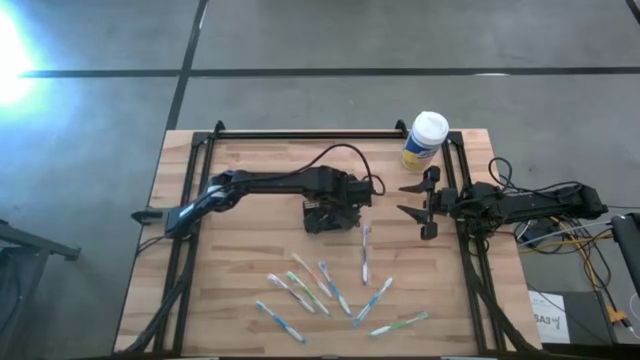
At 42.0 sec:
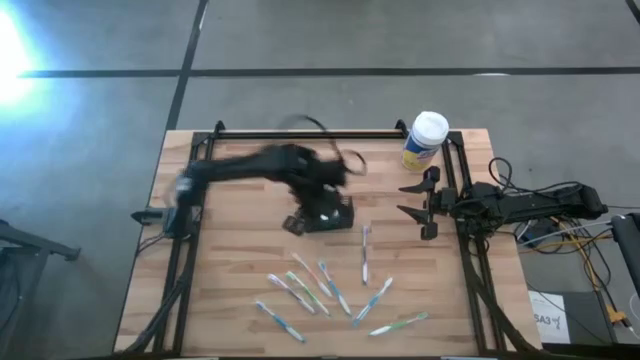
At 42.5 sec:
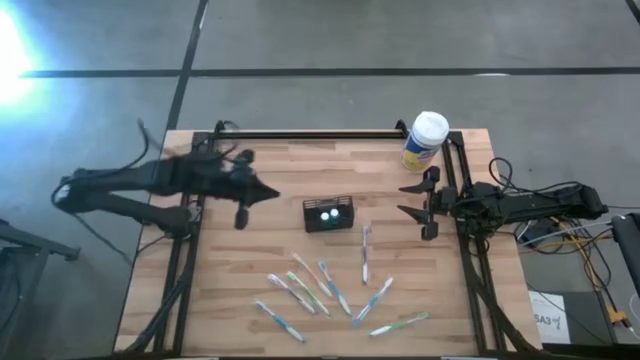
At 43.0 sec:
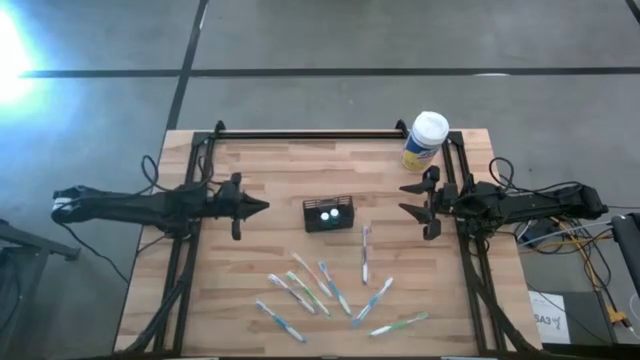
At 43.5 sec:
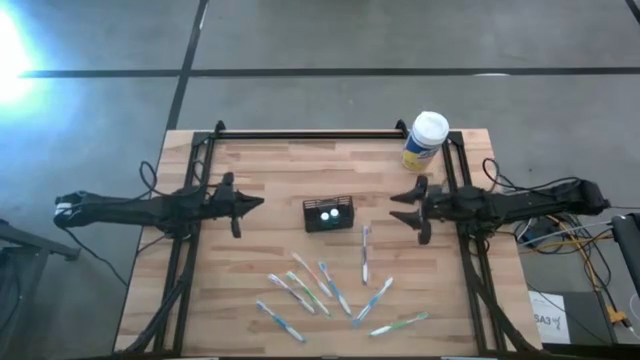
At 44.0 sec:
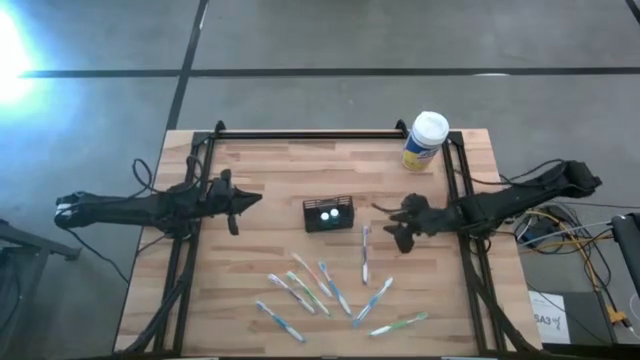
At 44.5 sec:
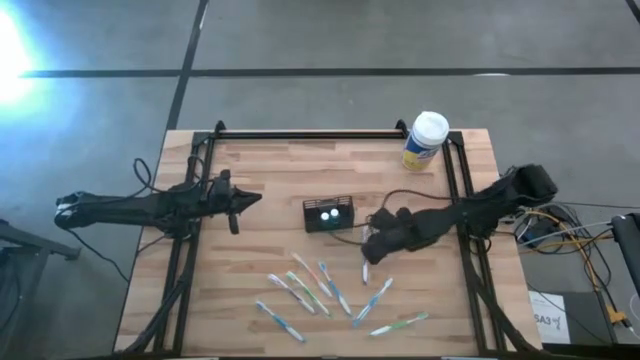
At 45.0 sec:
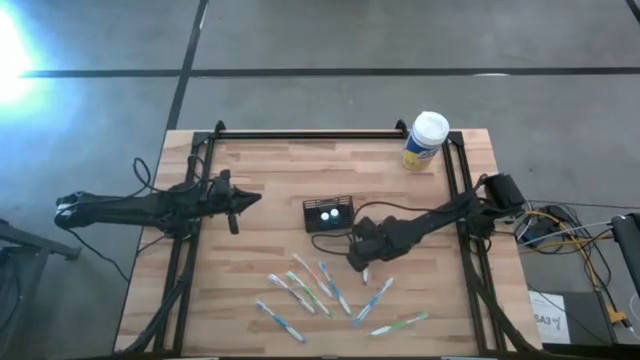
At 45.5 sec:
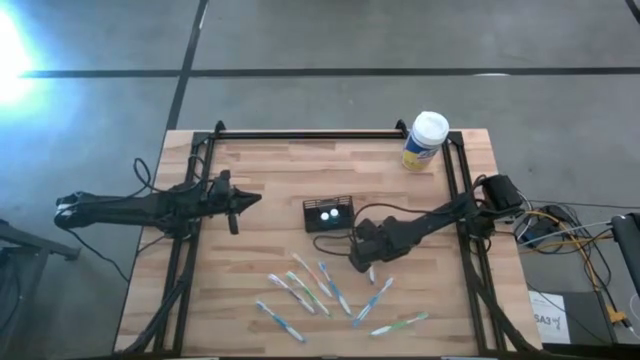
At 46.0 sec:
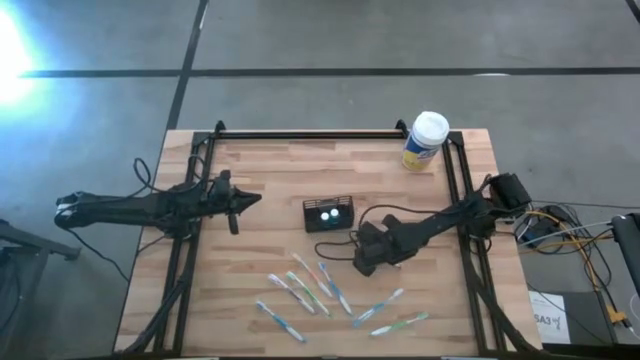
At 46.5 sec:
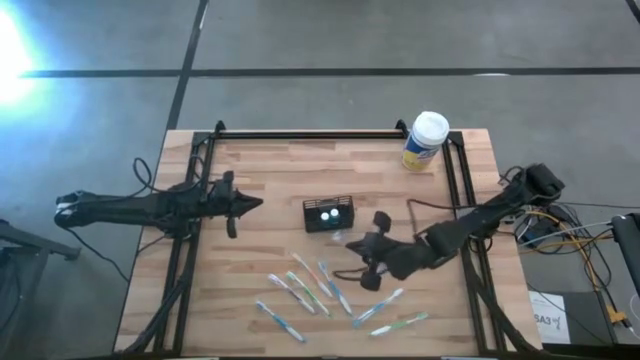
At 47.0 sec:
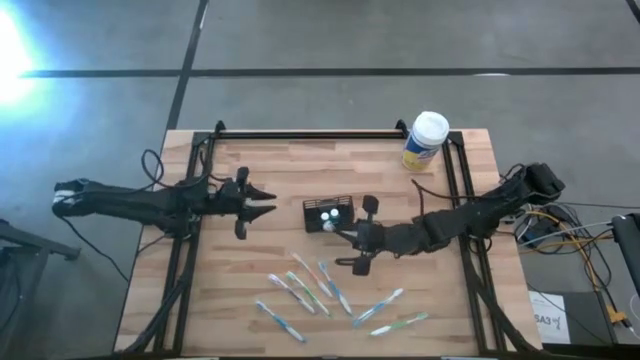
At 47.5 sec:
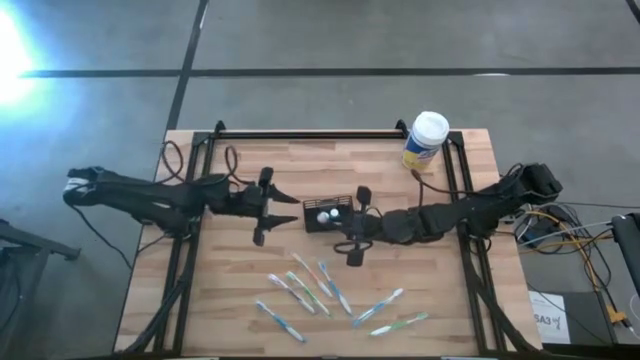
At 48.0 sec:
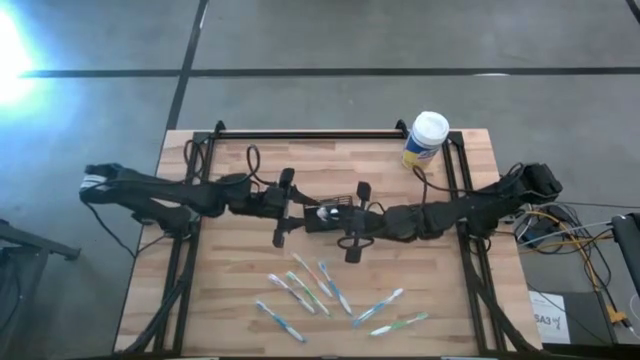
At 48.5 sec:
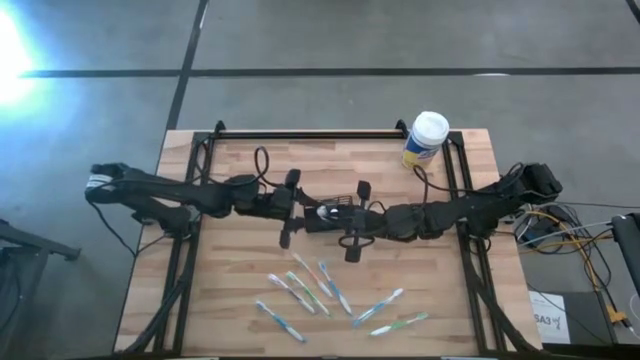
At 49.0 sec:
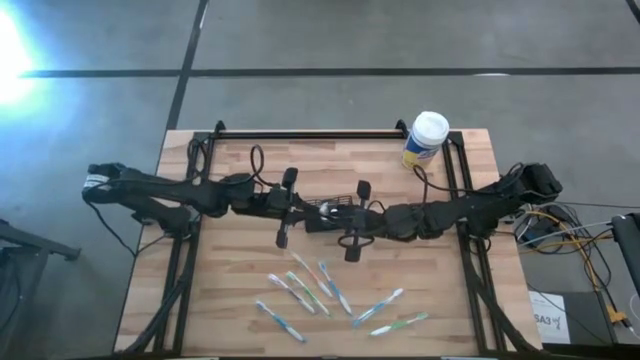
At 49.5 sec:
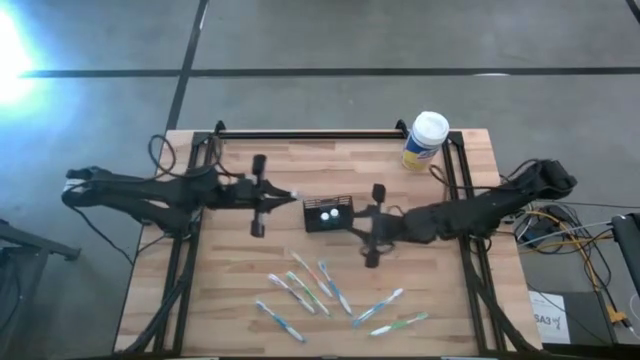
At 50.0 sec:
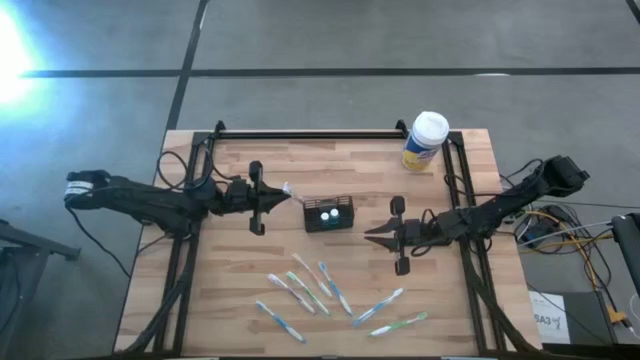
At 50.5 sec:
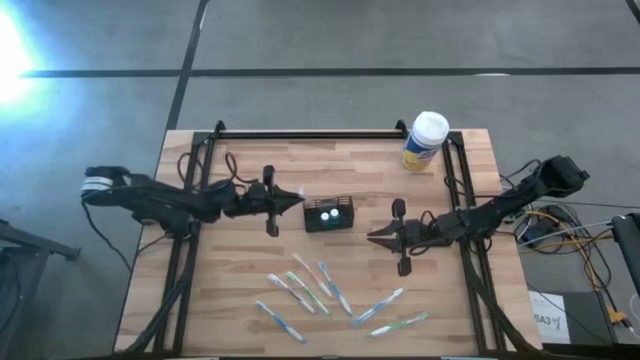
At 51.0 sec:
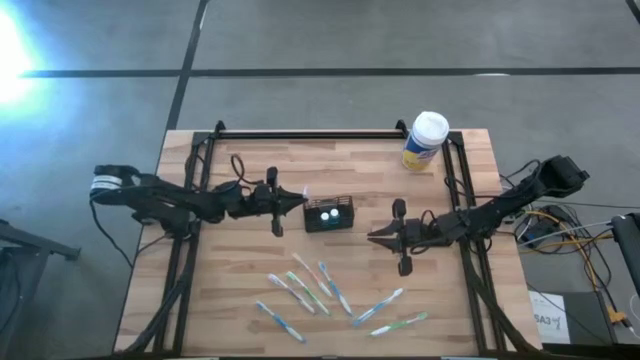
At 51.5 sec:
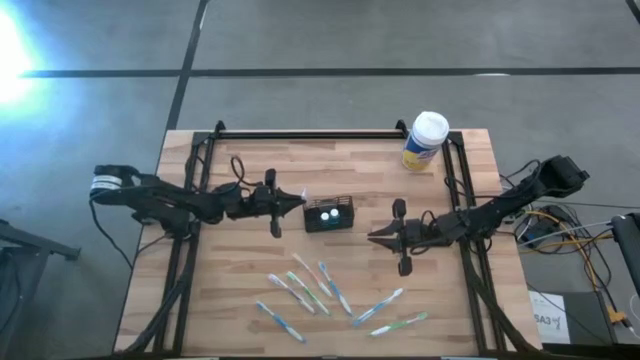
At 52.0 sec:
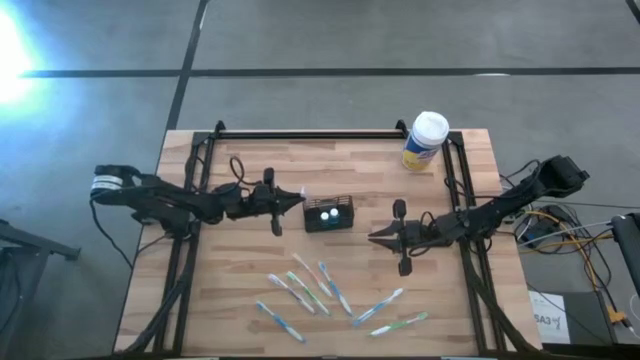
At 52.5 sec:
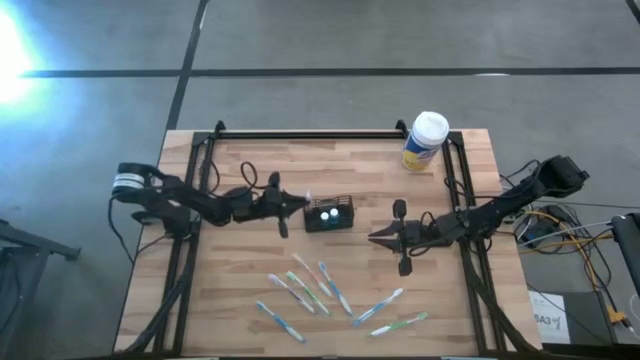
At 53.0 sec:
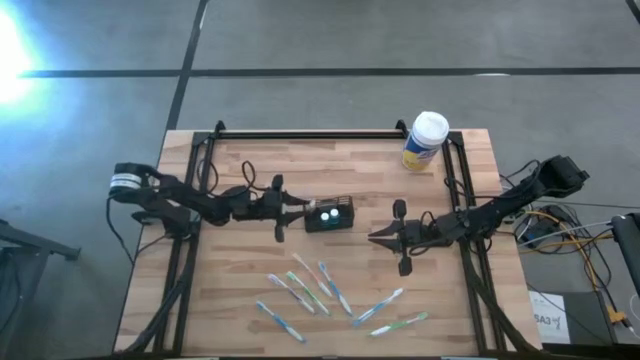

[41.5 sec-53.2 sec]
Task: Pick & Place toothbrushing station
Put the top violet toothbrush into the black wire organizer

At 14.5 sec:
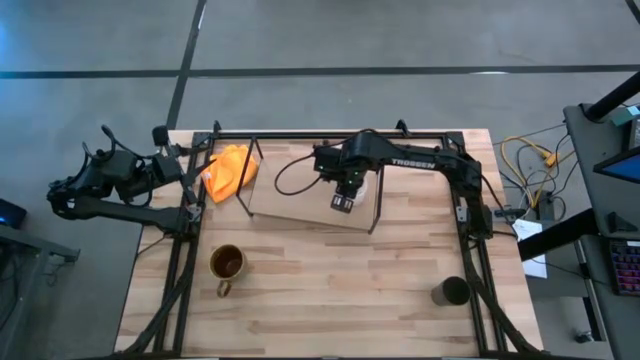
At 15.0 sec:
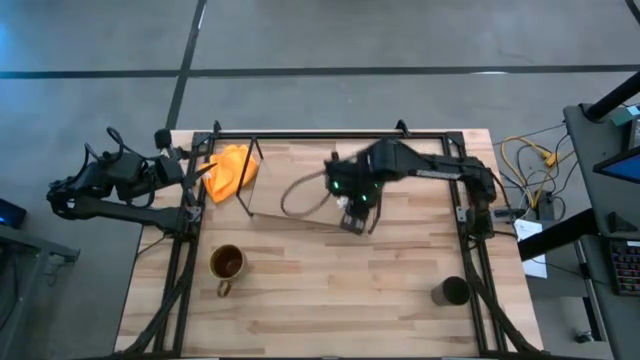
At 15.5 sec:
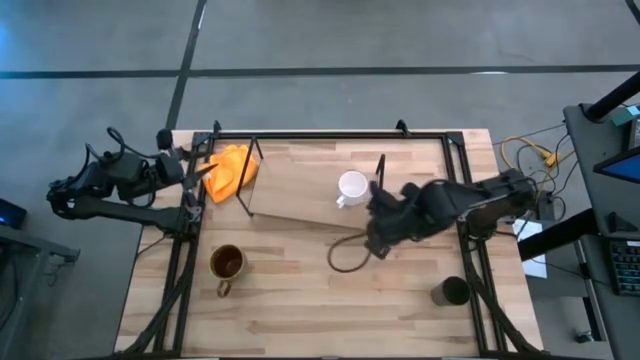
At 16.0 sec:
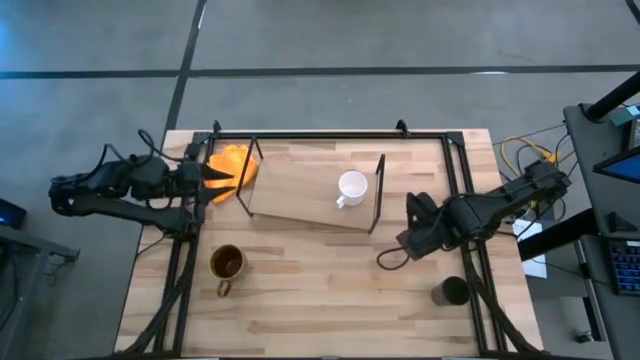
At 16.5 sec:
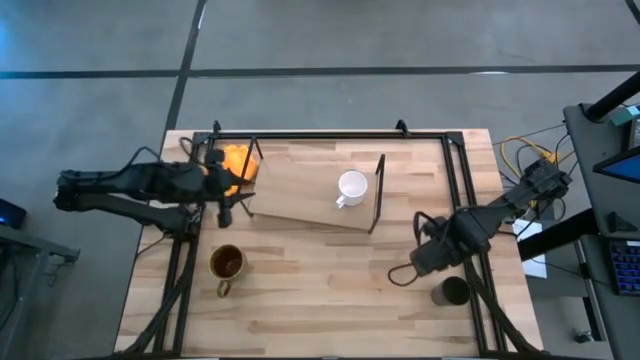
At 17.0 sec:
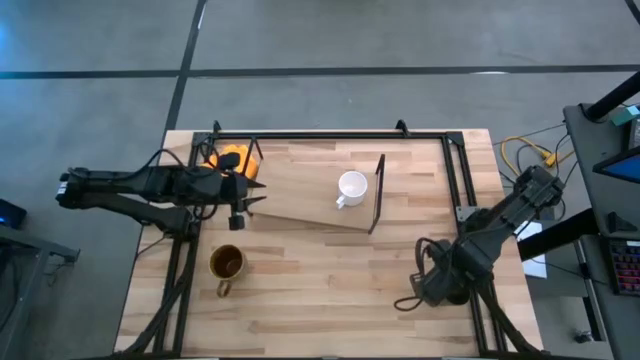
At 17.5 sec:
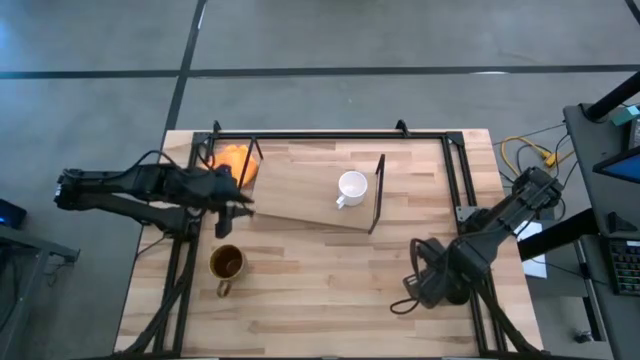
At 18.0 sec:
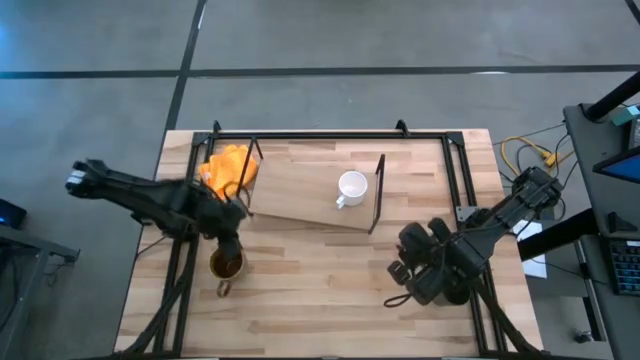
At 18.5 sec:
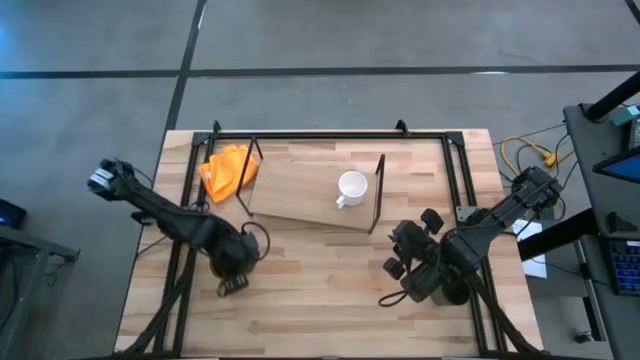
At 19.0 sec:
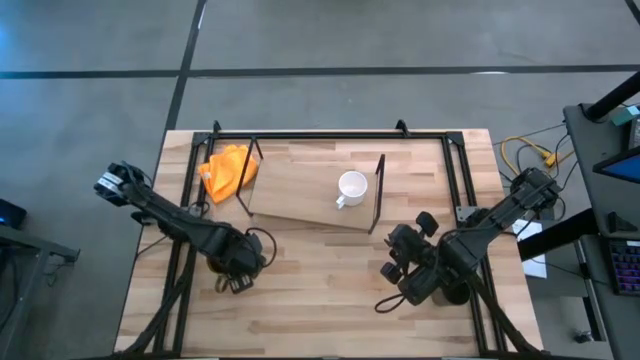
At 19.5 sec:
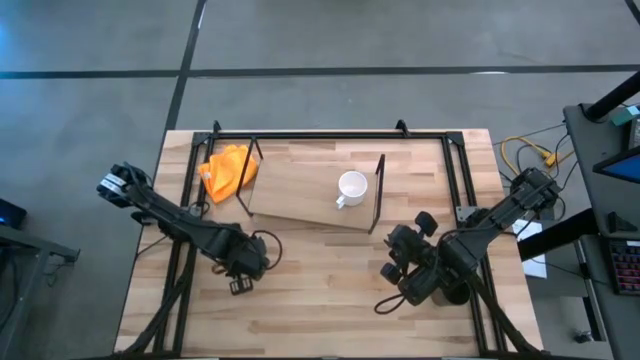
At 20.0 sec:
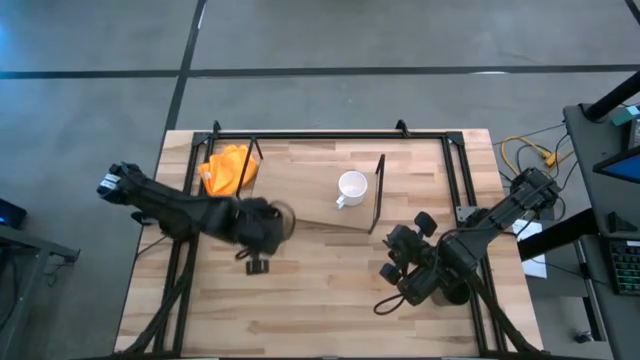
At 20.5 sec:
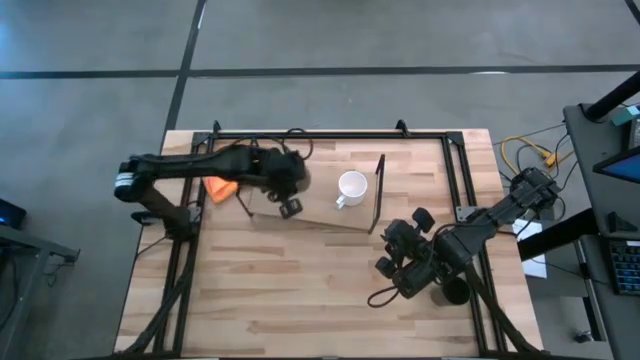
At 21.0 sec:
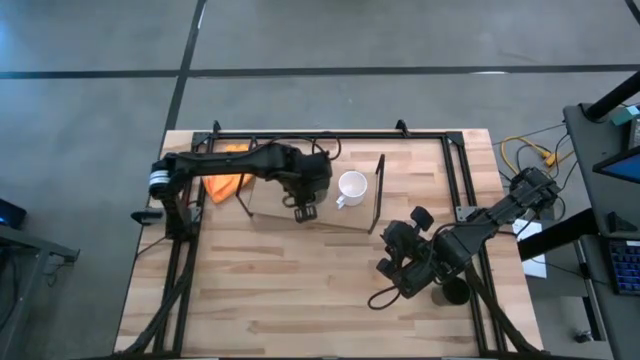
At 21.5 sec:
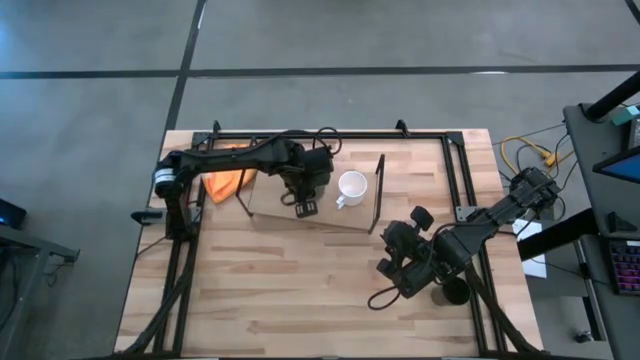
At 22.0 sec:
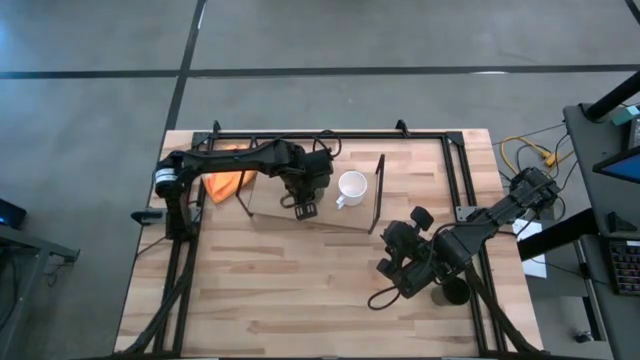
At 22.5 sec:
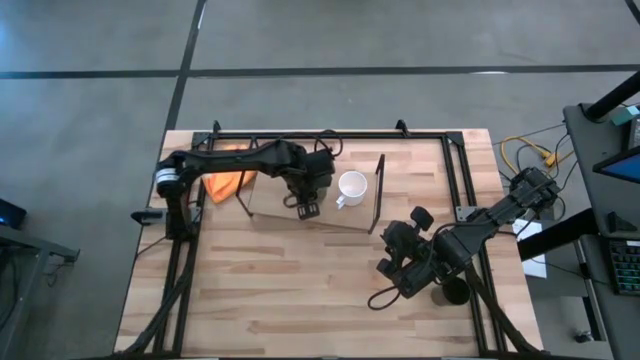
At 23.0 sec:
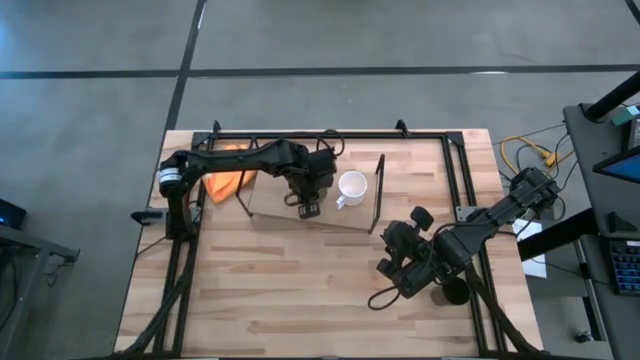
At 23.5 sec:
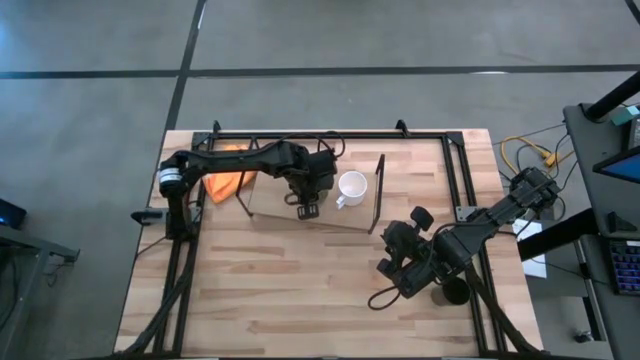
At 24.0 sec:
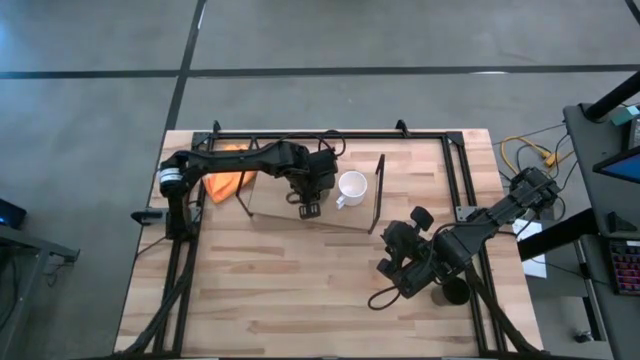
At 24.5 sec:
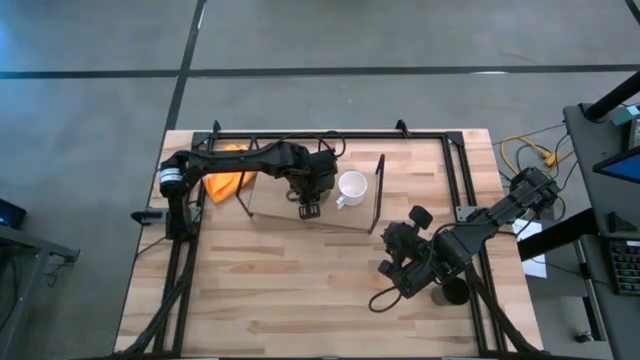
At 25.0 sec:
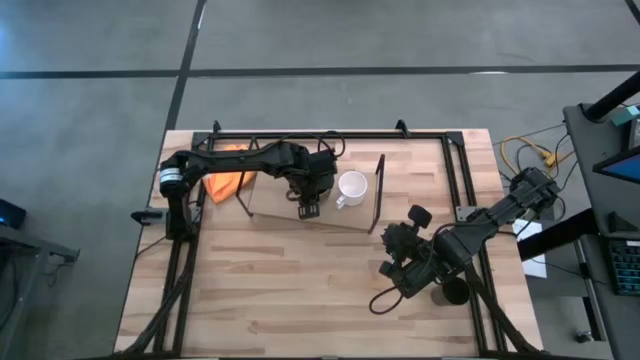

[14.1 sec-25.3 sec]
Task: Stack small to large cups/mugs on shelf
Put the green mug on the shelf
